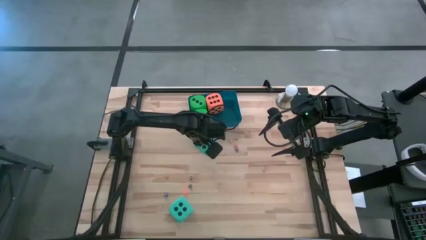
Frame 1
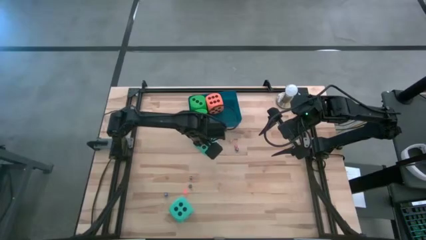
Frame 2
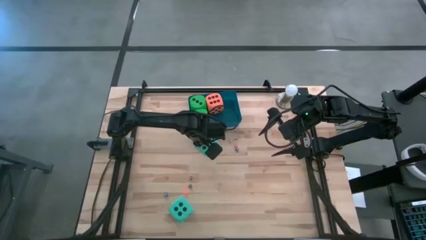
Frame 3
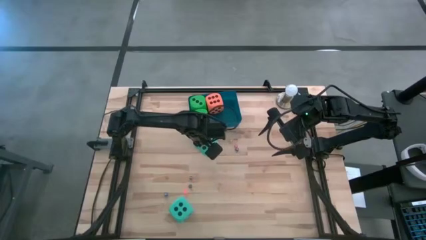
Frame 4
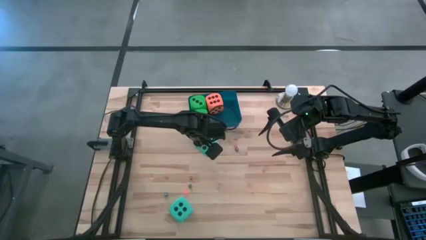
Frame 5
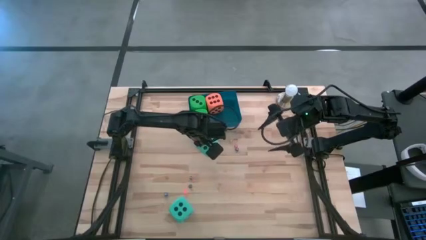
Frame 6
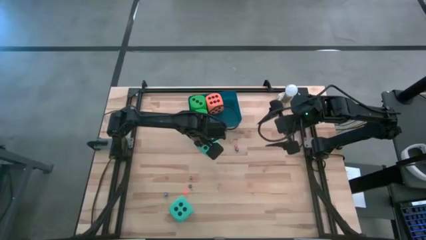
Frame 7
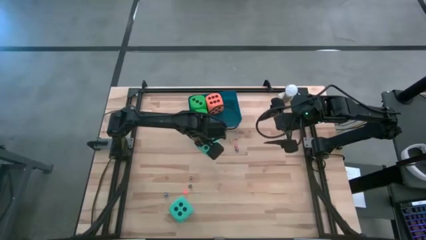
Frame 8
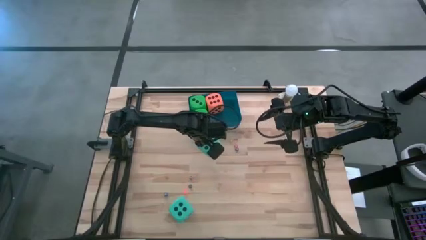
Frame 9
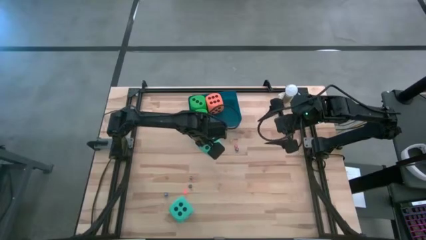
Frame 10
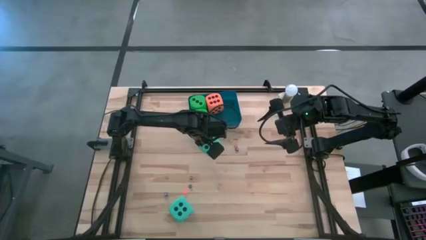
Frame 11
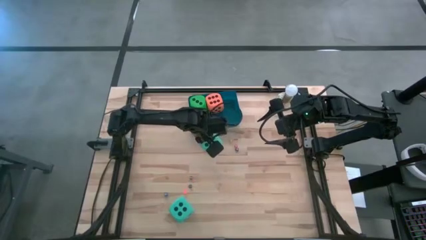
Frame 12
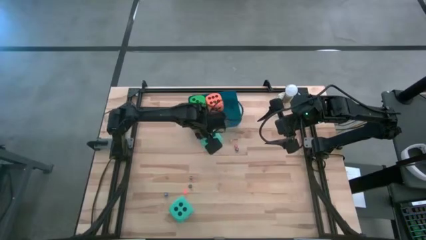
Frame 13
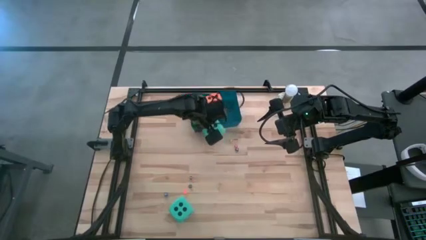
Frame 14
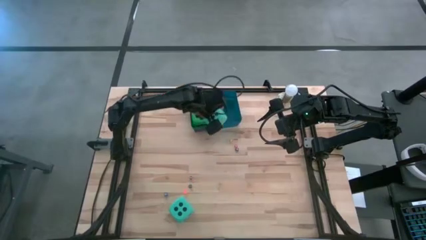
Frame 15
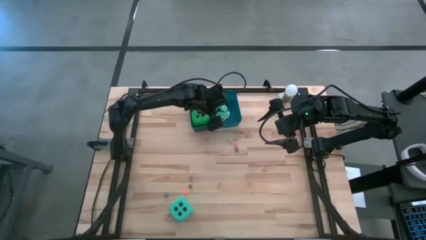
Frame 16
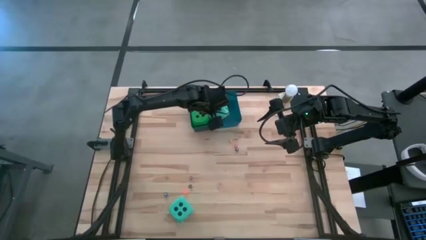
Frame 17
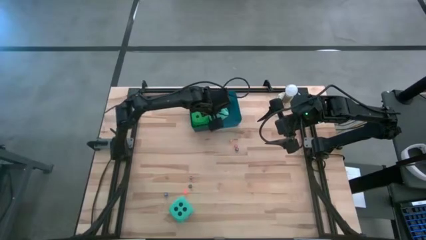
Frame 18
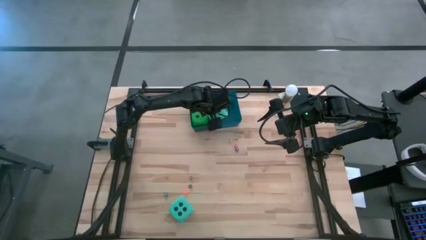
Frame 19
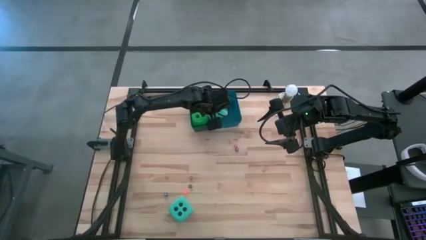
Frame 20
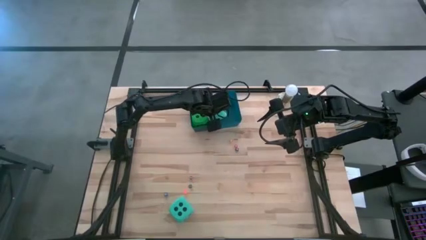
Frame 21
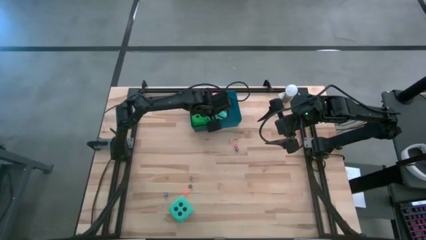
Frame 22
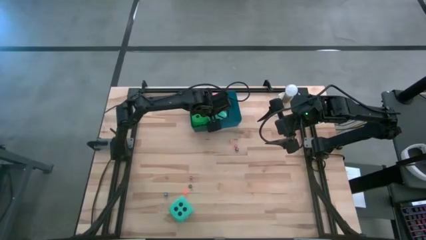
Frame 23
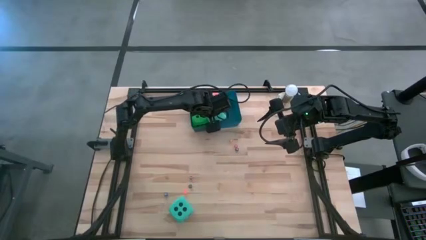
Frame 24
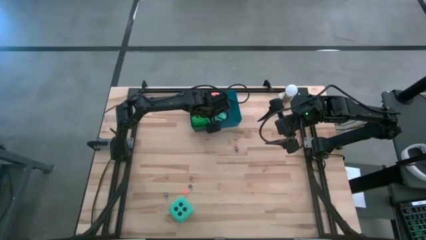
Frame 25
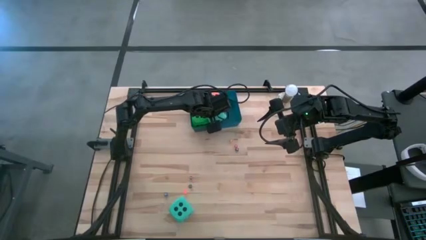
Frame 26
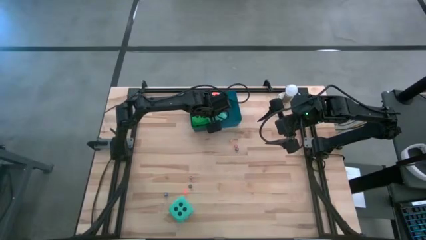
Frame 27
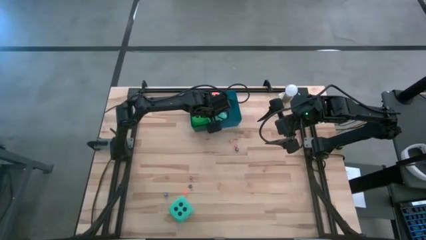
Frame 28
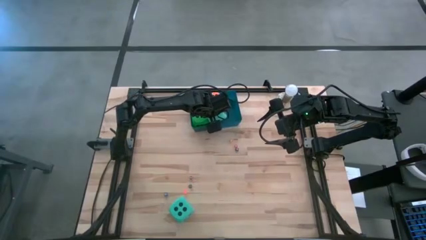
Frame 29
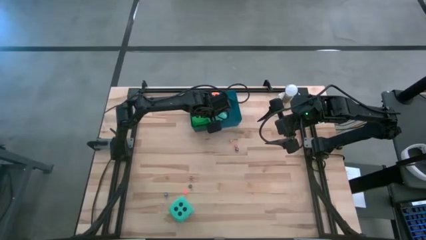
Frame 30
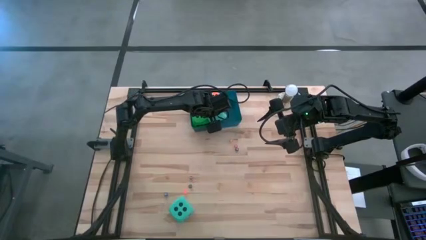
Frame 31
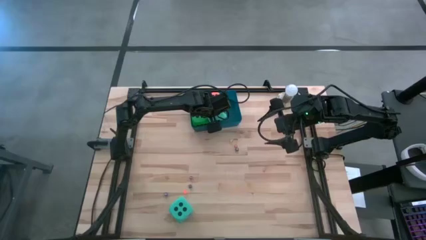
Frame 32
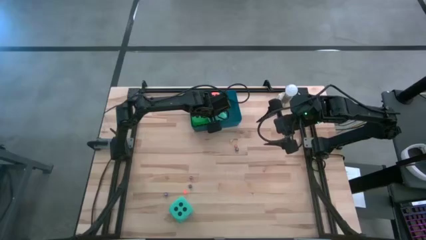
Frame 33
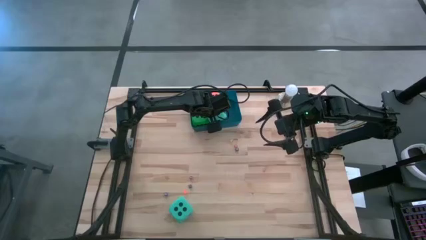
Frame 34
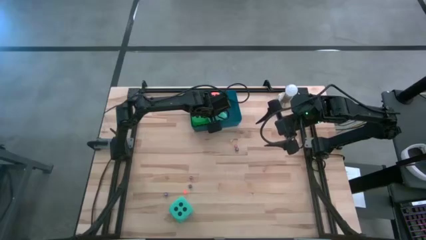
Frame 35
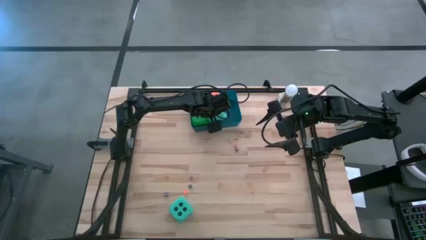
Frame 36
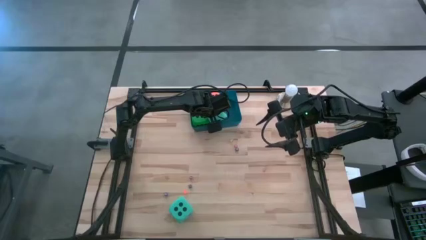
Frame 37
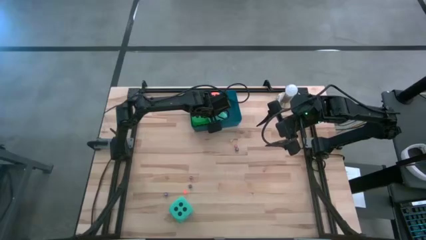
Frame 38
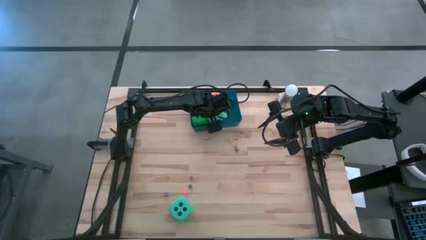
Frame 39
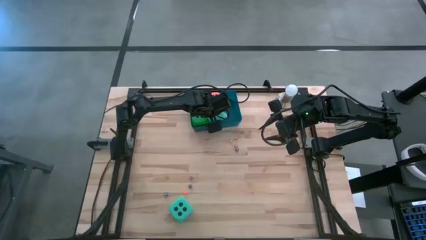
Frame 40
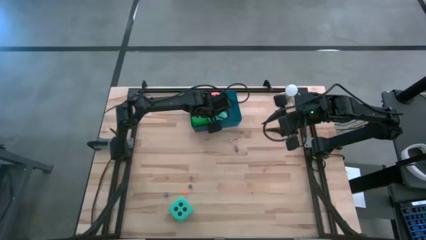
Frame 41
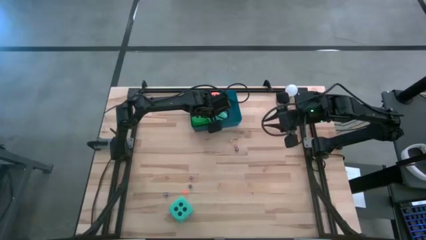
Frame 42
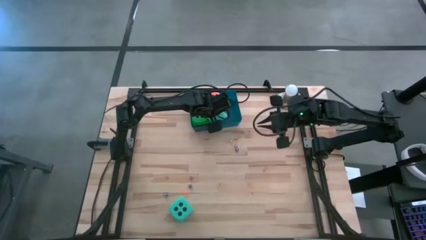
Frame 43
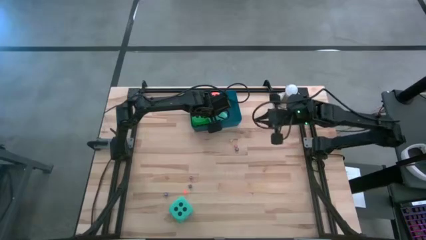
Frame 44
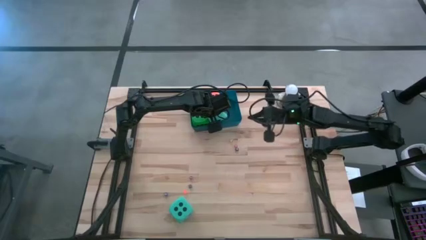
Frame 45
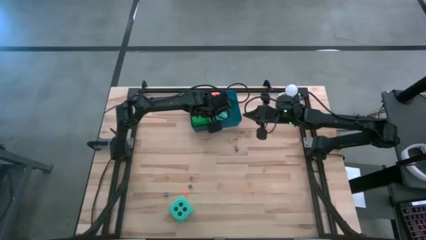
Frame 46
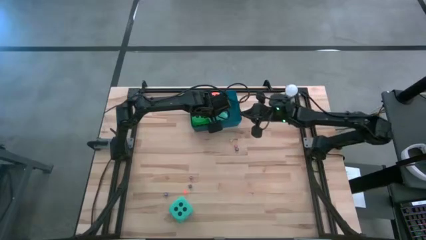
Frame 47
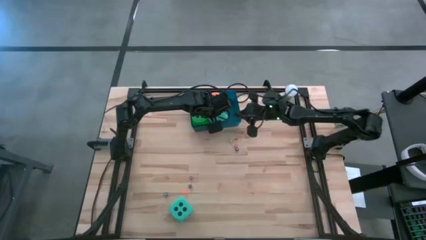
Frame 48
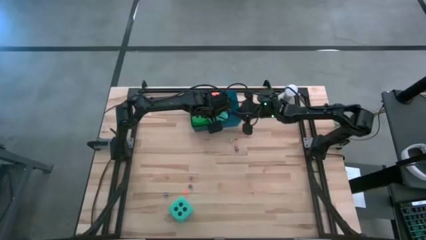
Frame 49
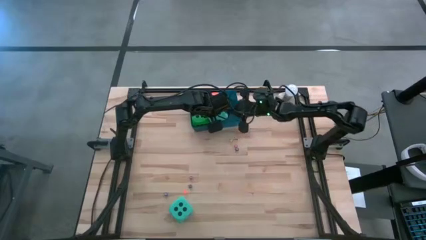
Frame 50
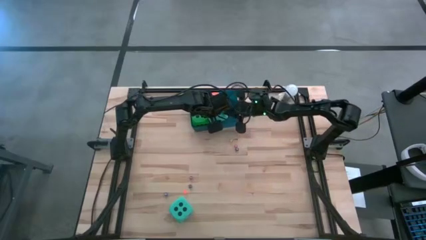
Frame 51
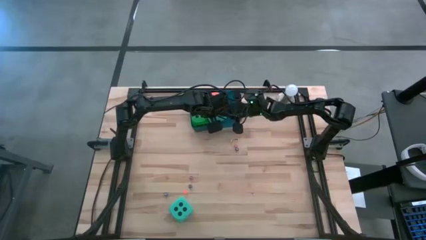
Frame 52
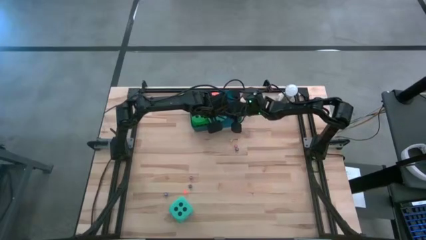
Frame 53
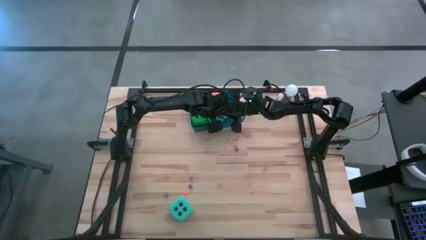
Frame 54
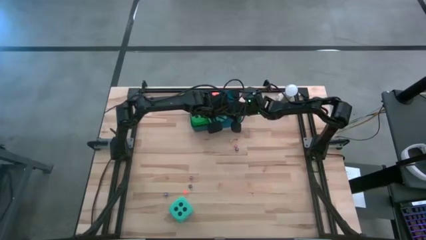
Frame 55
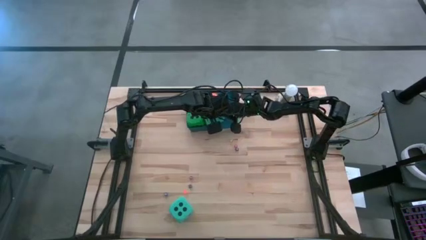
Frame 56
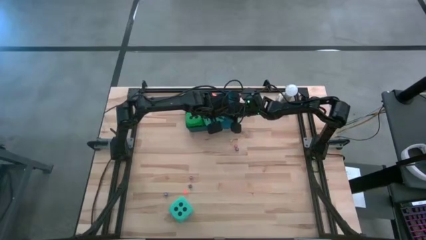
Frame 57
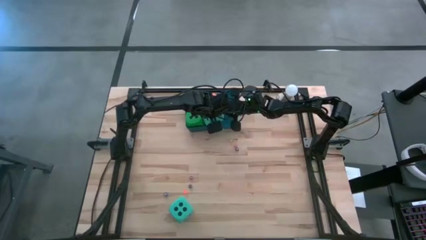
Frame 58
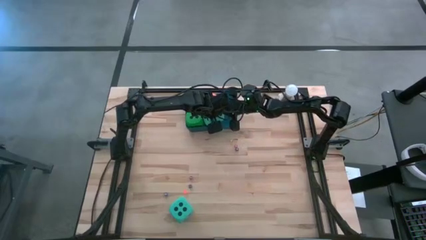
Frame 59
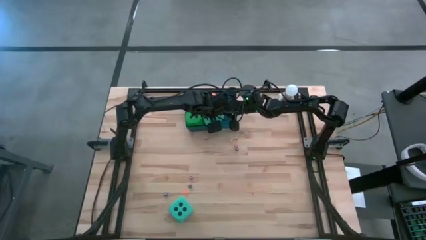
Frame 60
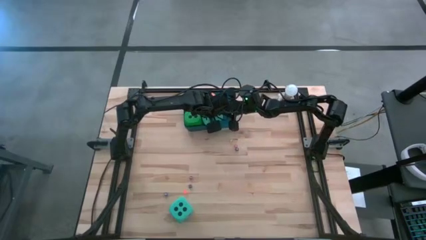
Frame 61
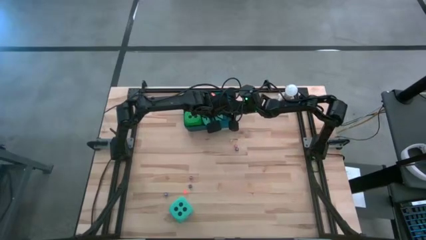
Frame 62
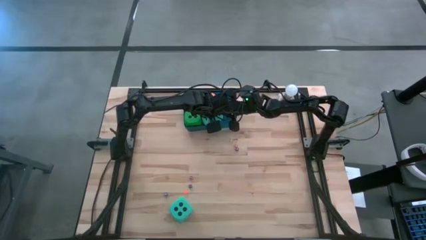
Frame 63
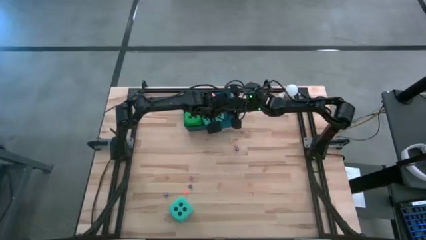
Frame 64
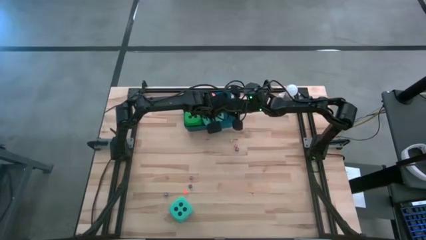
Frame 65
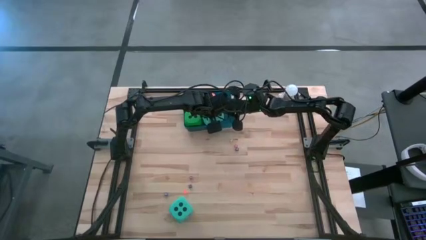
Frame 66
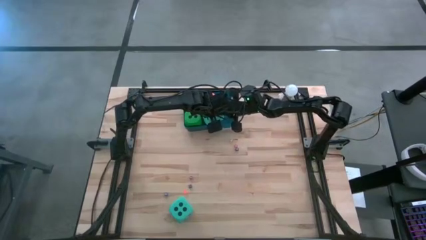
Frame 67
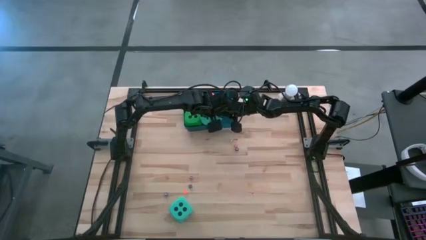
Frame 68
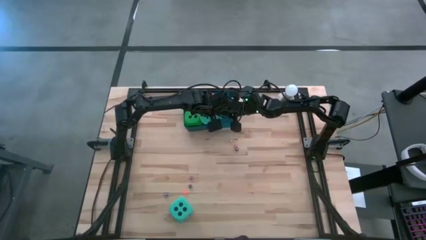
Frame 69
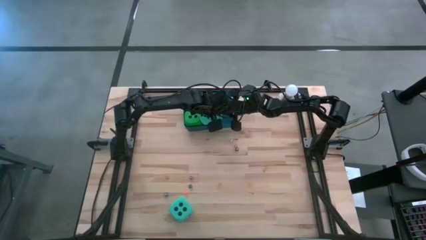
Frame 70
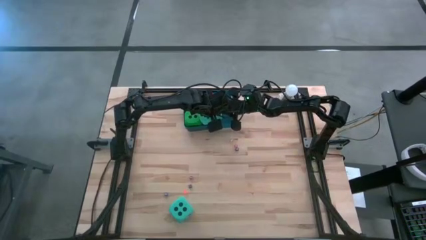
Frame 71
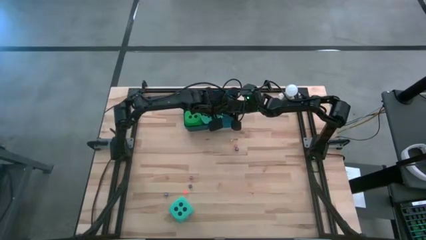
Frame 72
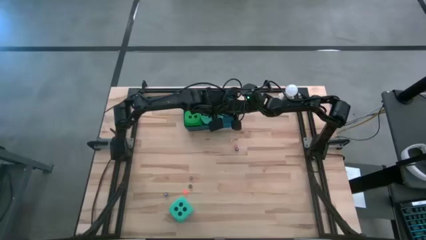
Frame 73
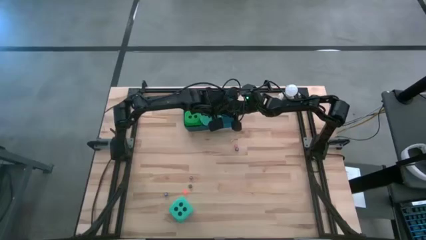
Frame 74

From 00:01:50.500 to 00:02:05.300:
Task: Pick & Place Dice
Put the top blue dice into the blue bin
